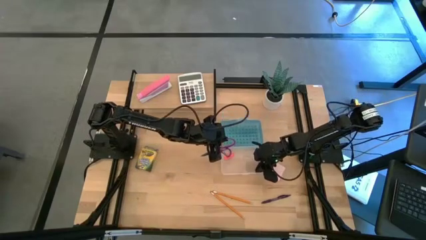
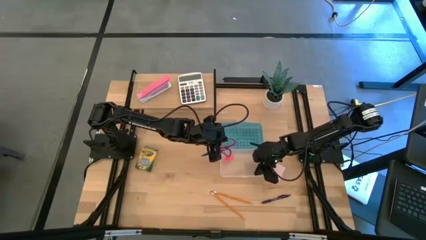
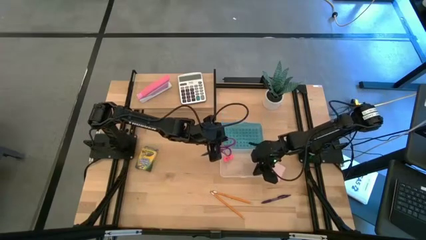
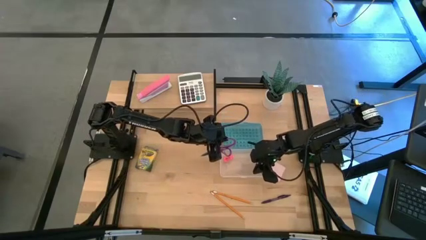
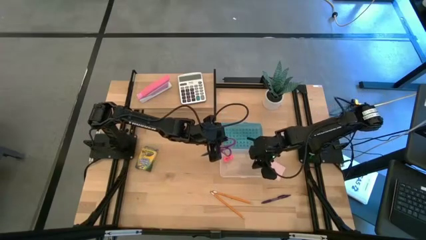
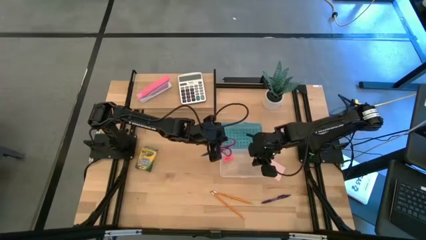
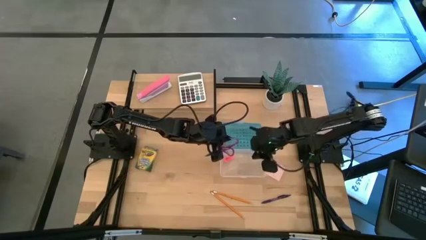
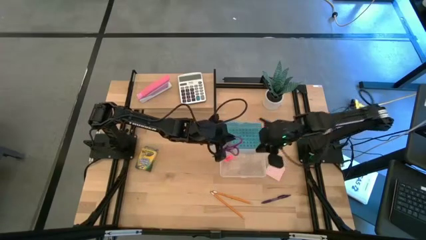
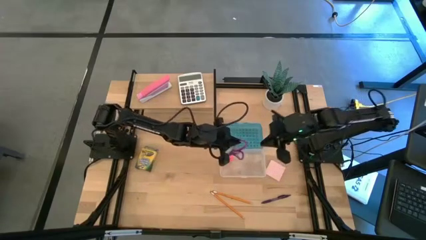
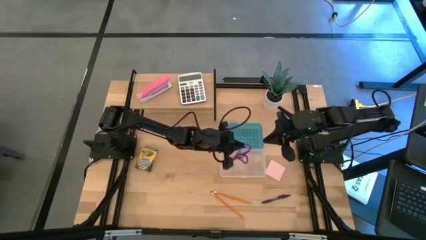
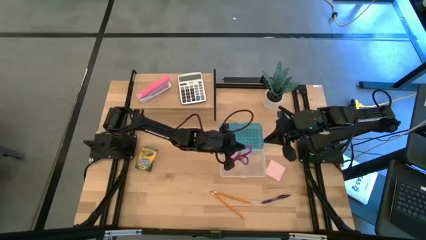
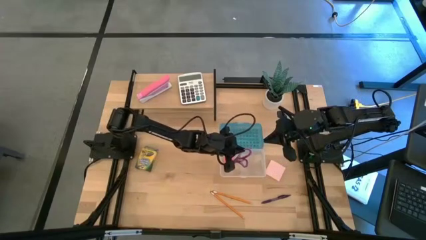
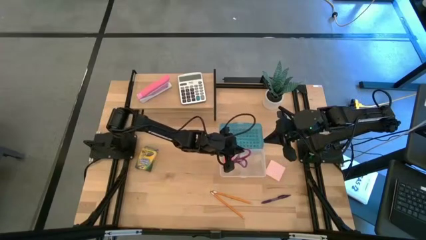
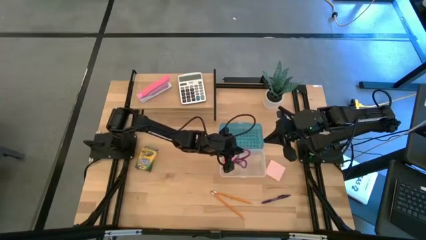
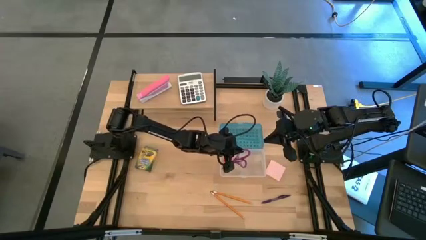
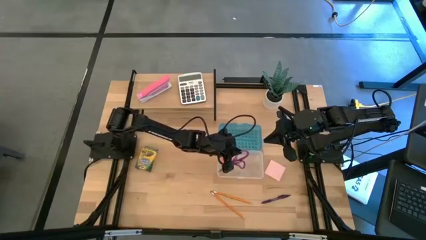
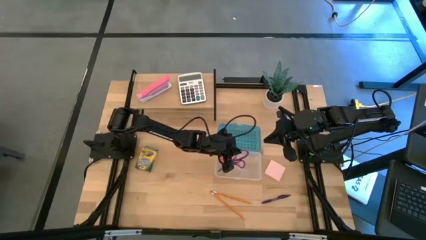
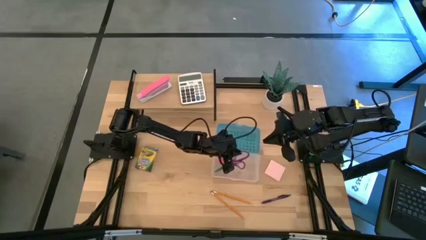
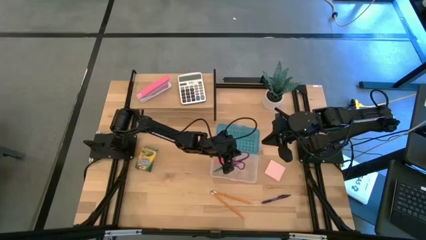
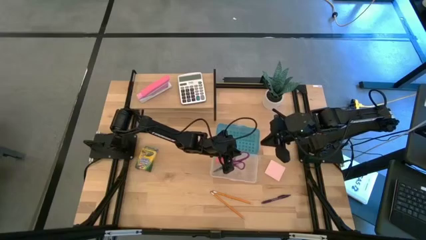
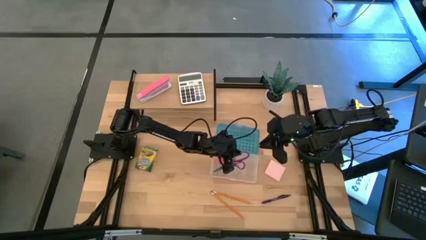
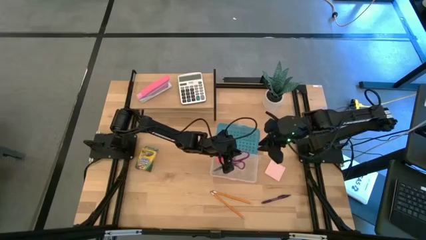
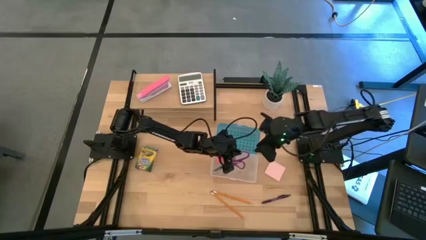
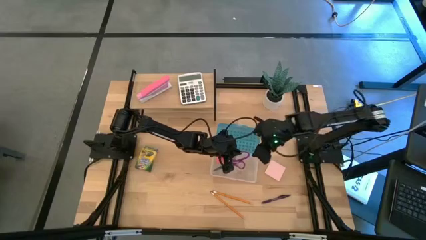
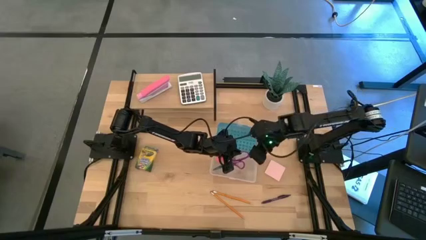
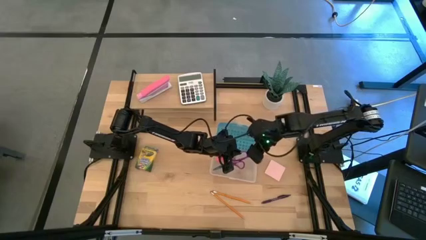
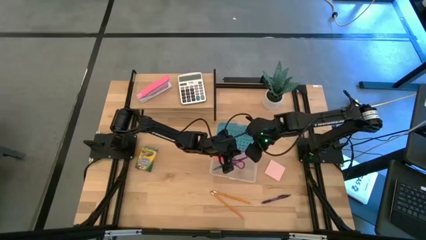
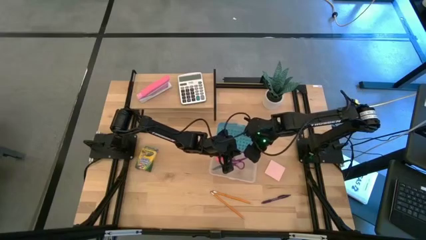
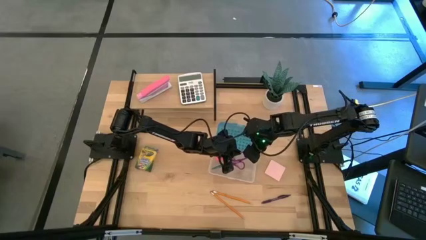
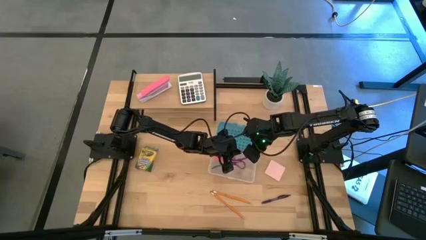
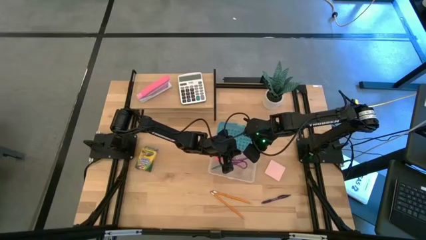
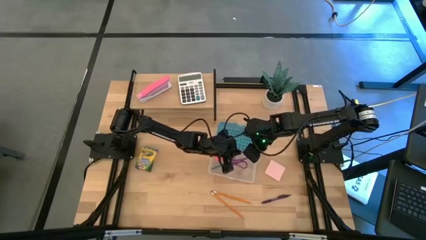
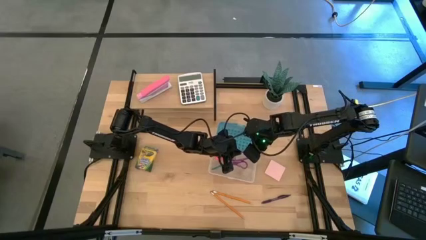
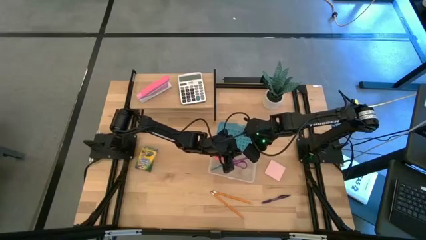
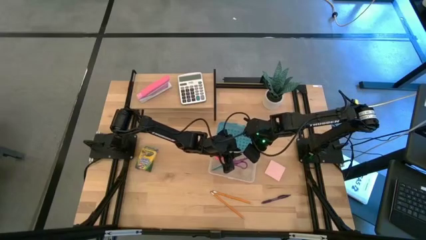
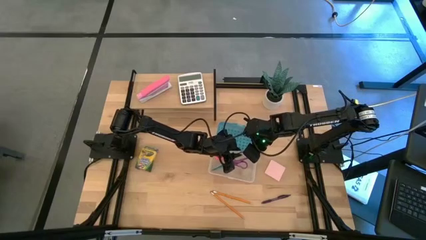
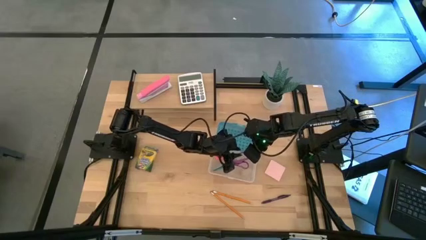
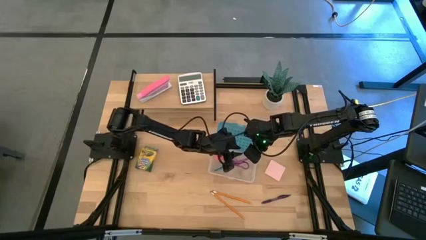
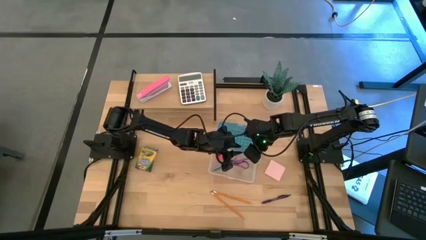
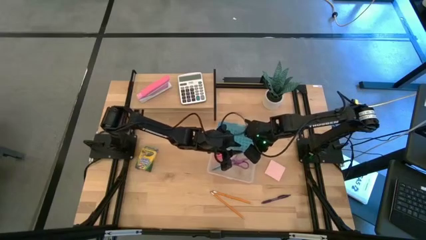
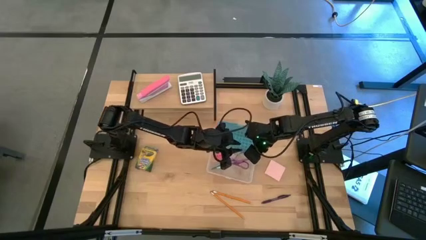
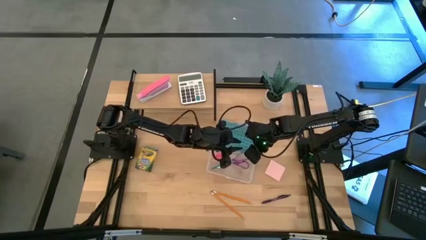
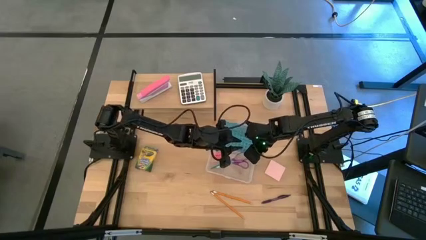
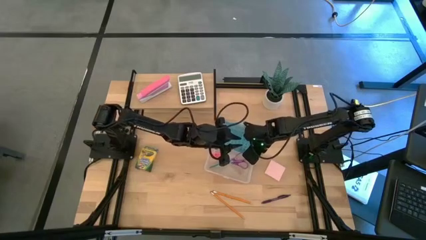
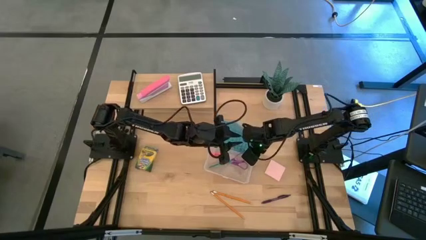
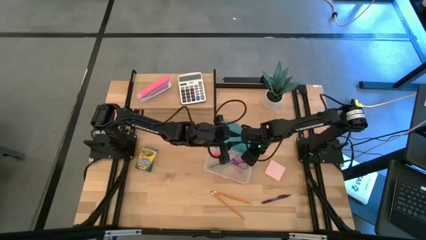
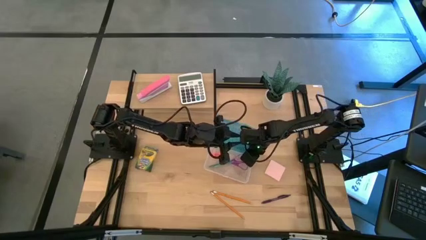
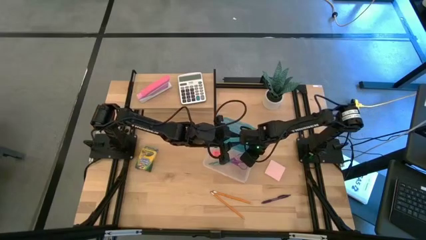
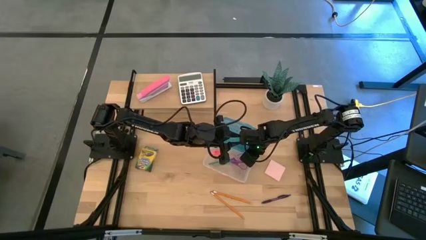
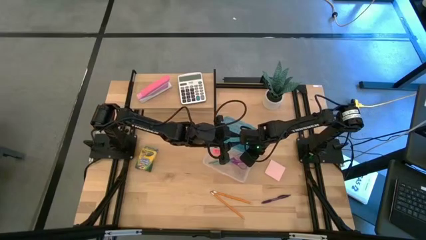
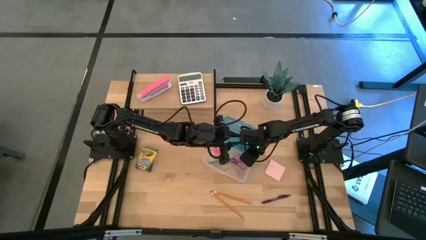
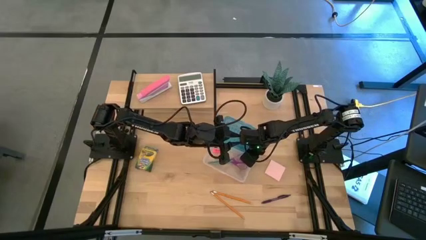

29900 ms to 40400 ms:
Task: Pack school essentials
Put the scissor into the supply box

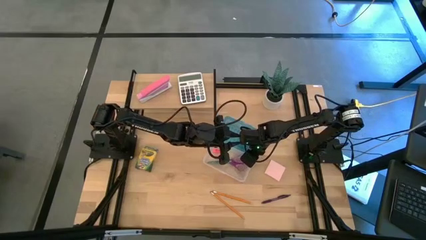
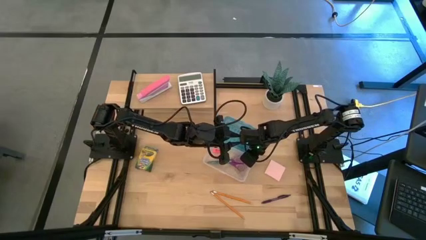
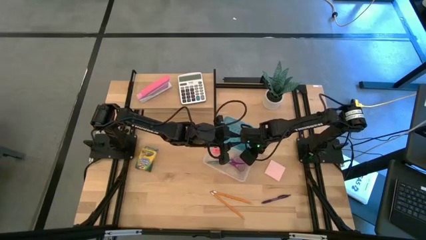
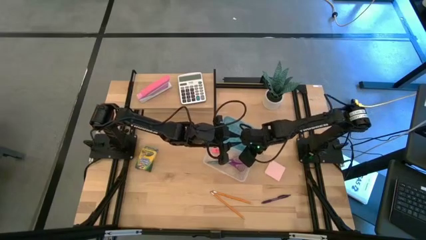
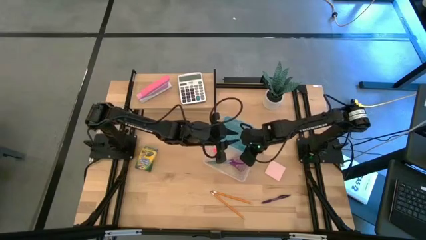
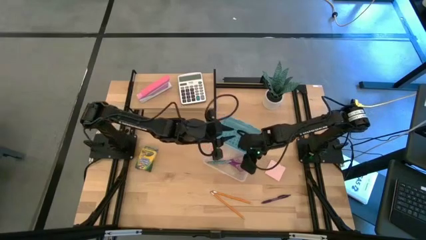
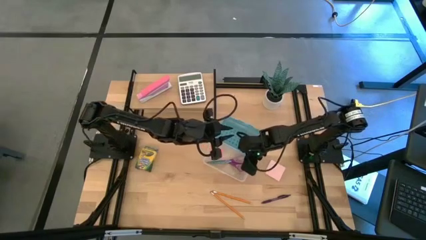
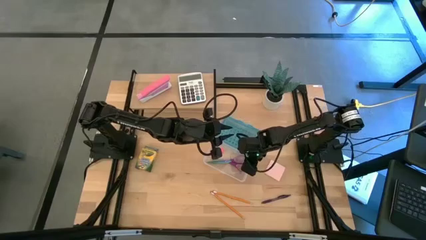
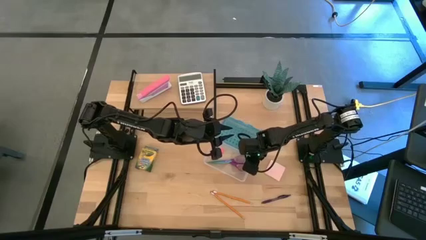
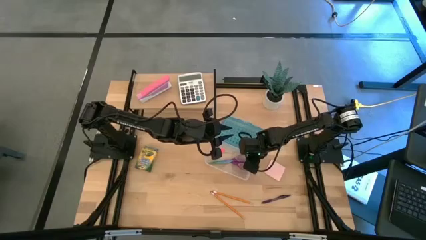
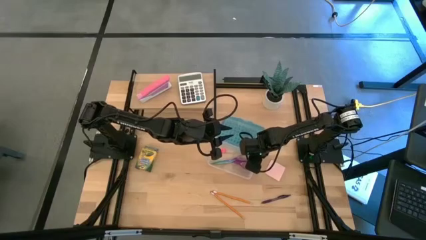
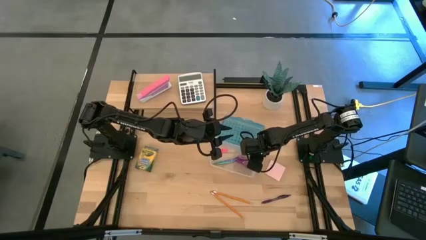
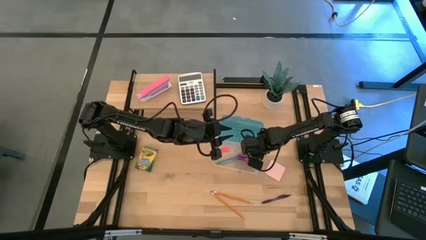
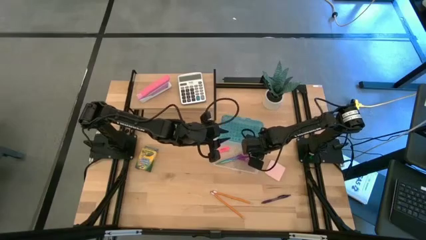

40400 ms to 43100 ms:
Adjust the supply box

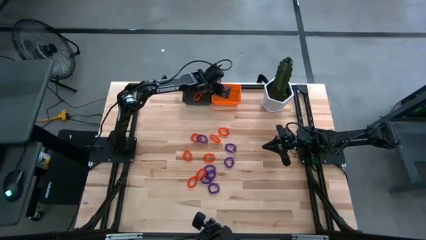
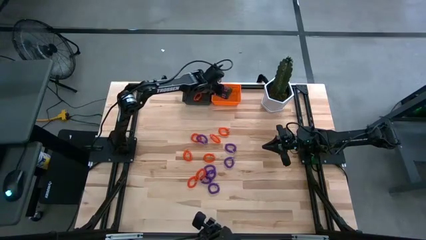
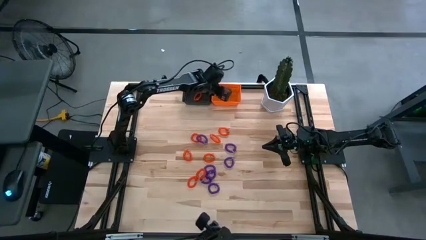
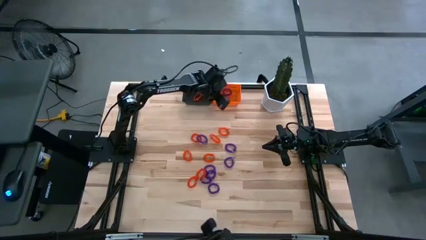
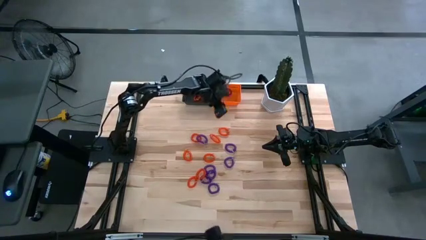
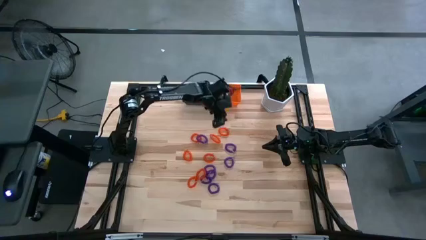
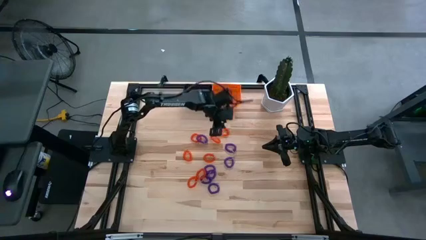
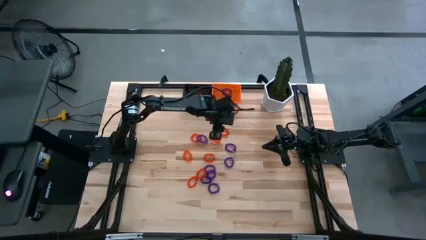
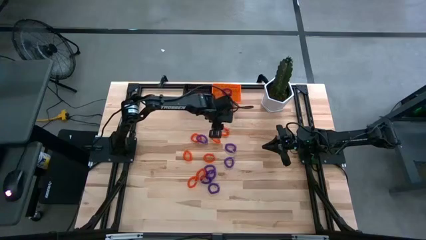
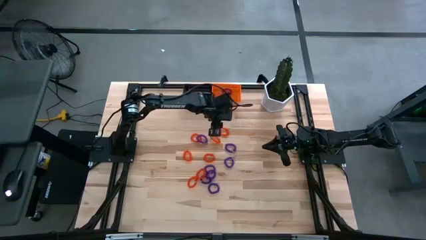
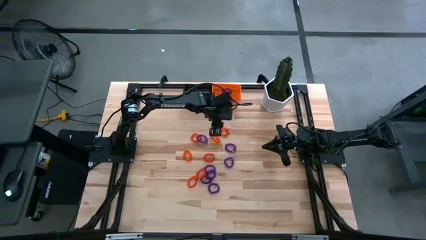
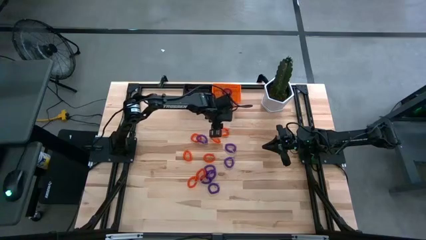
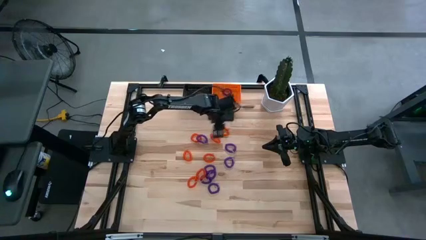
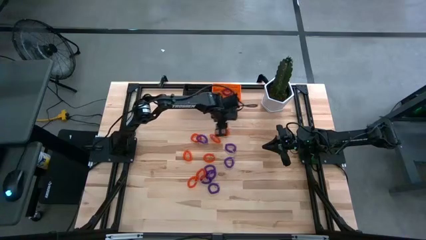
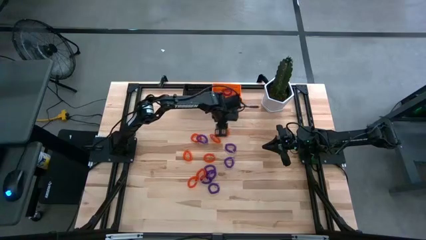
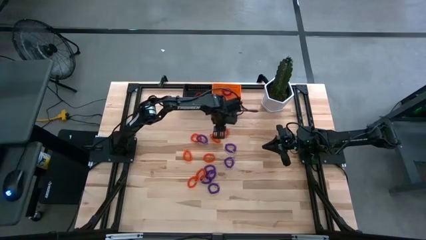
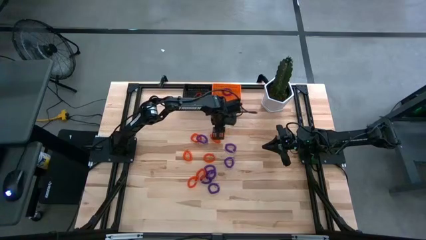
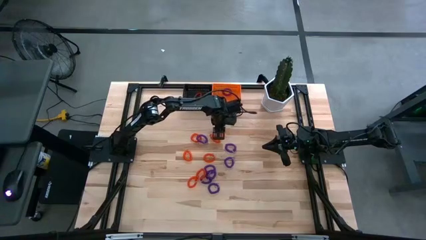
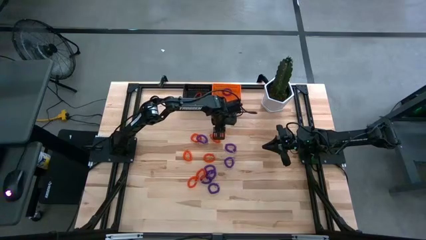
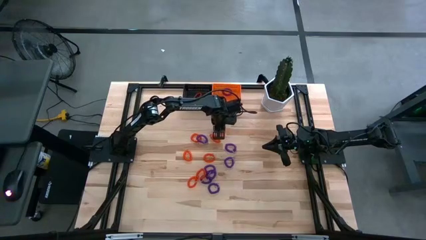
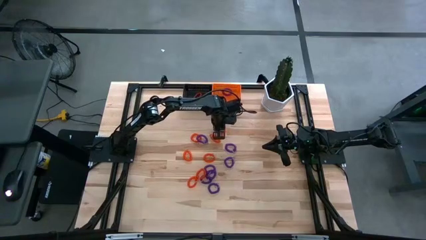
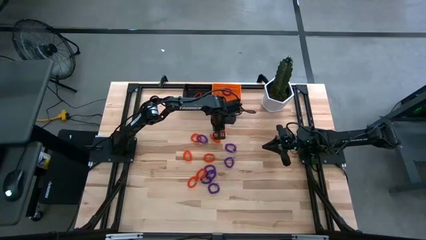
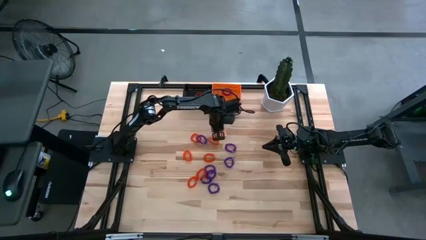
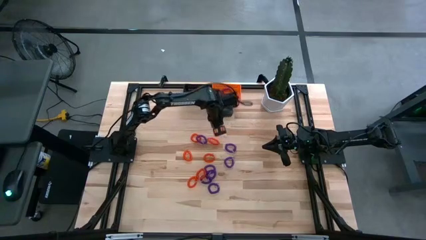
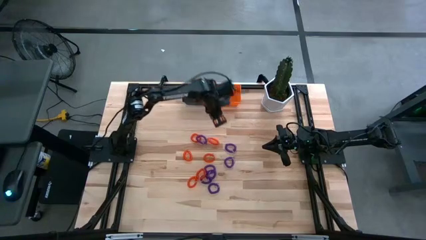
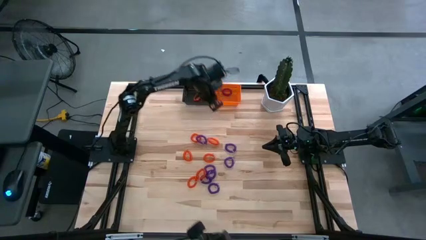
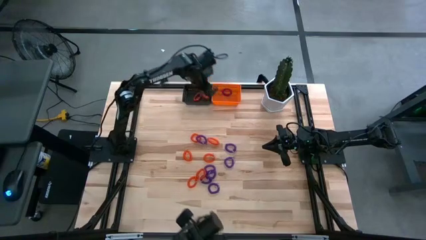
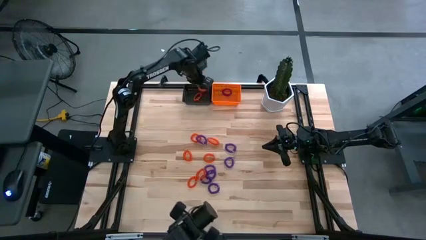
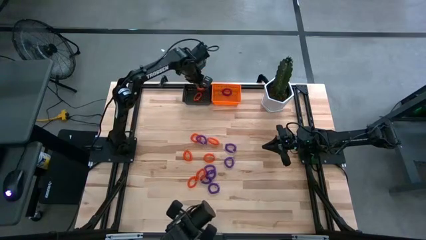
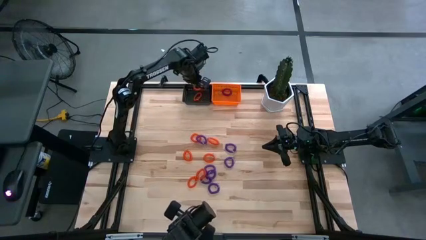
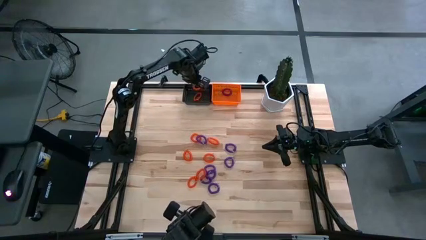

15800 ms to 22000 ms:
Task: Sort spring keychains into baskets
Put the orange spring keychain into the black basket
